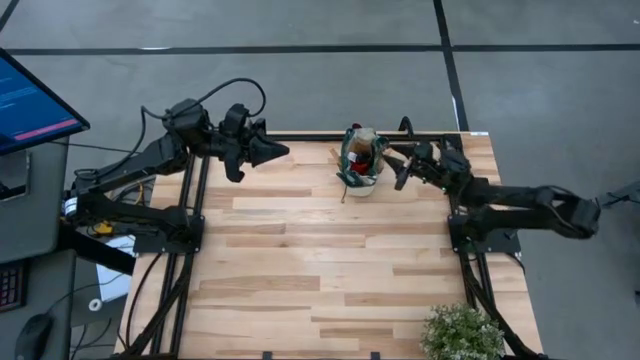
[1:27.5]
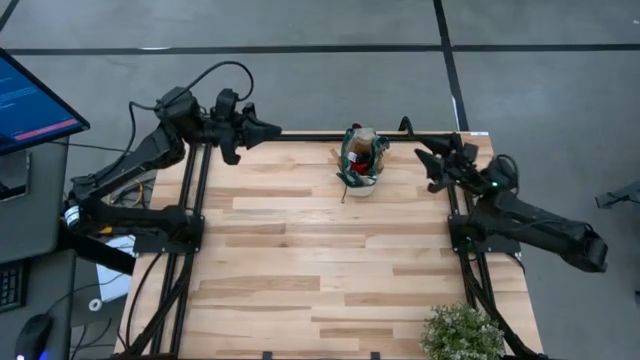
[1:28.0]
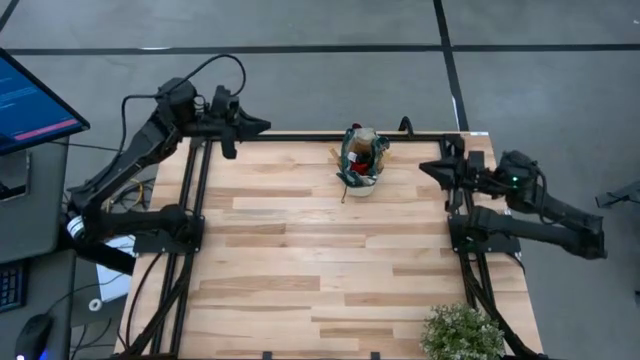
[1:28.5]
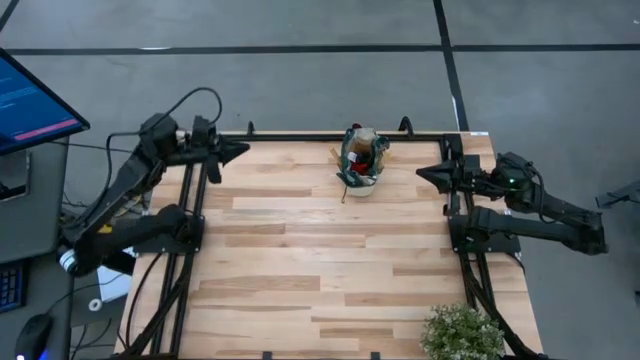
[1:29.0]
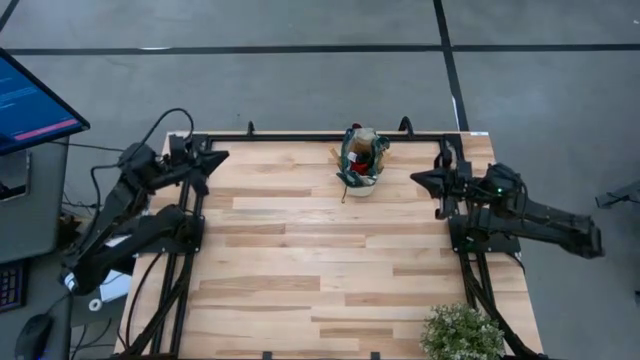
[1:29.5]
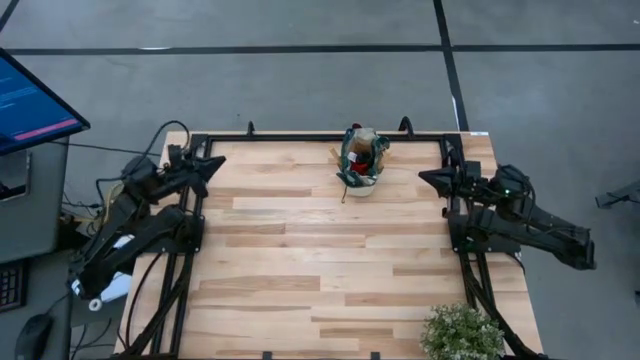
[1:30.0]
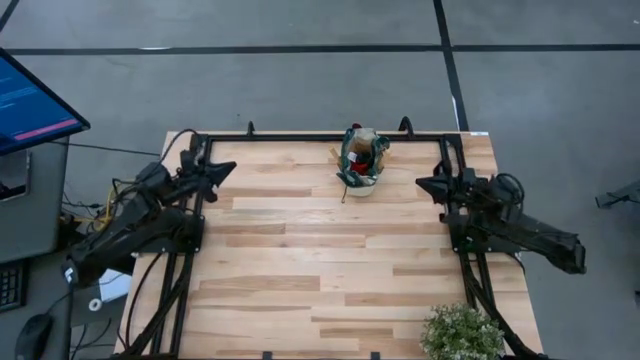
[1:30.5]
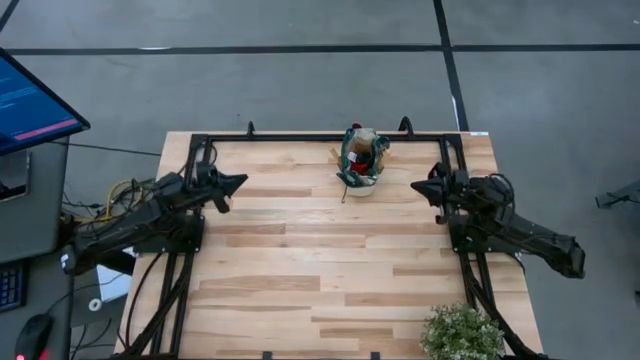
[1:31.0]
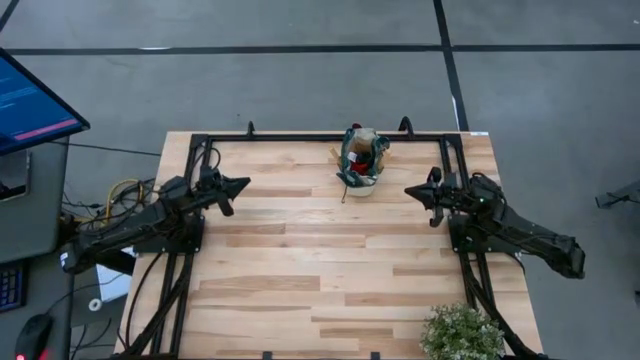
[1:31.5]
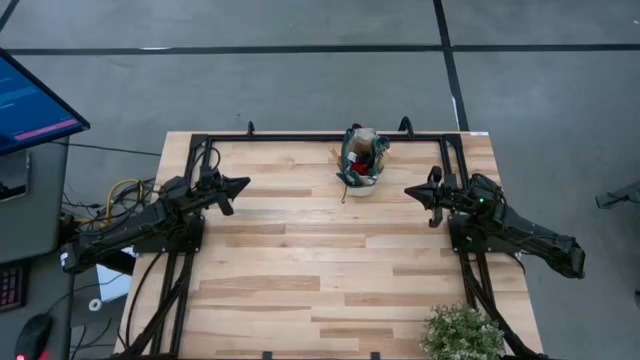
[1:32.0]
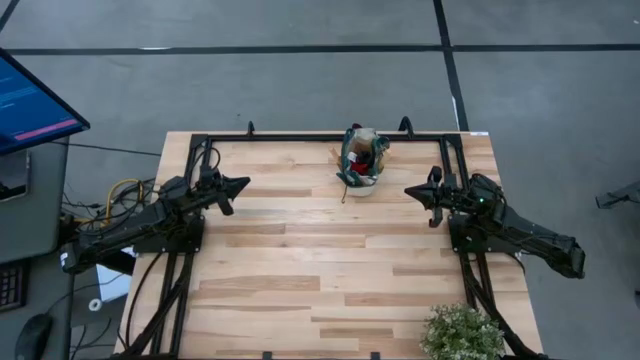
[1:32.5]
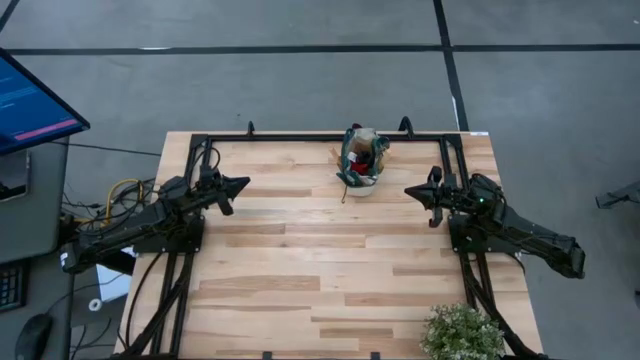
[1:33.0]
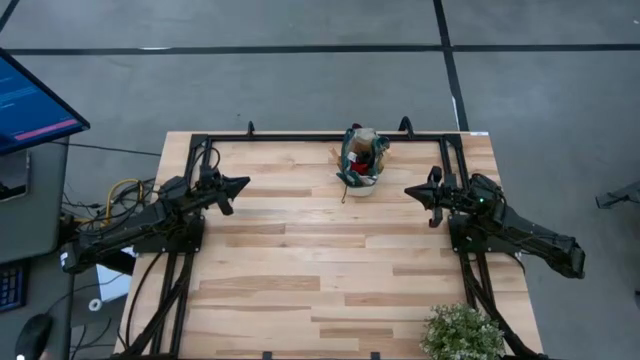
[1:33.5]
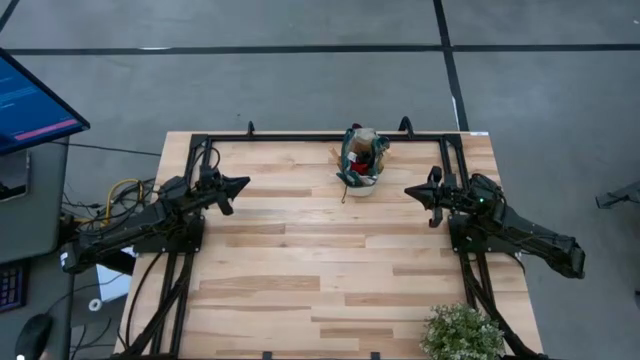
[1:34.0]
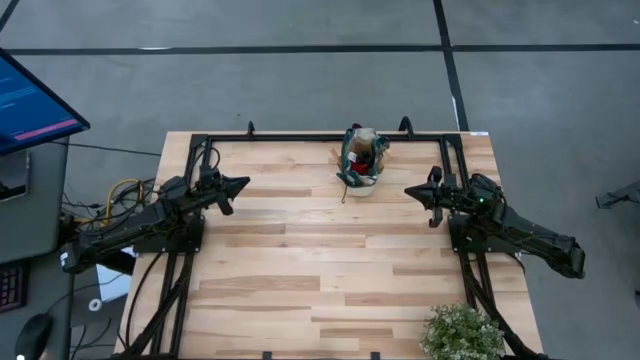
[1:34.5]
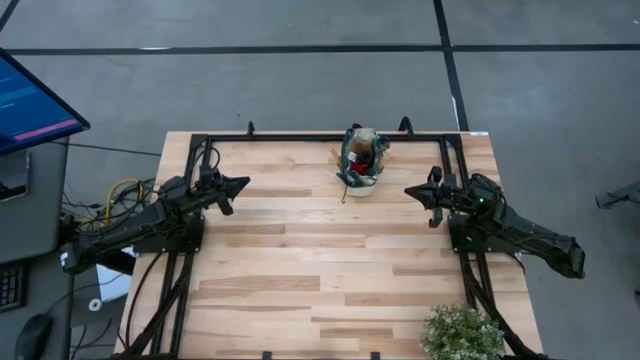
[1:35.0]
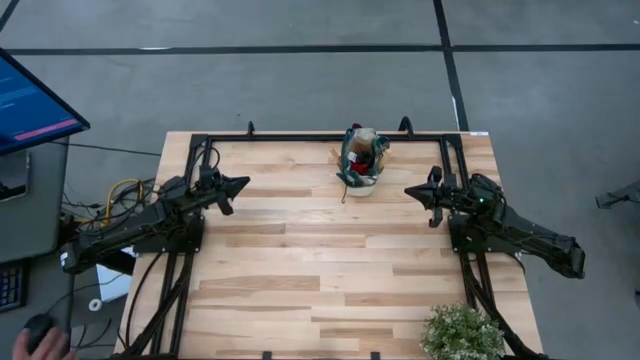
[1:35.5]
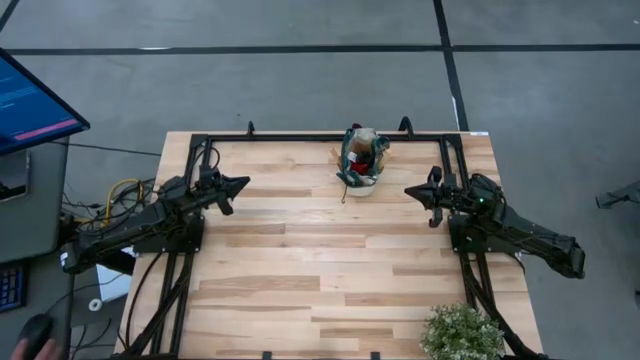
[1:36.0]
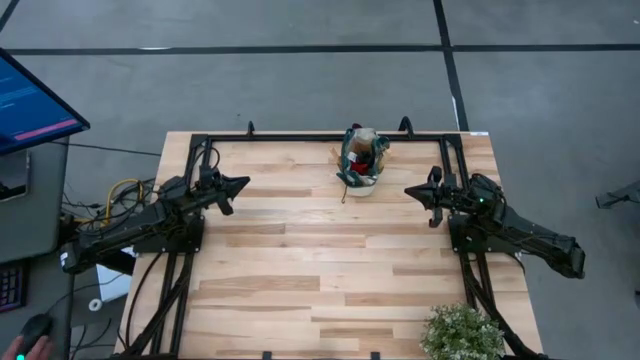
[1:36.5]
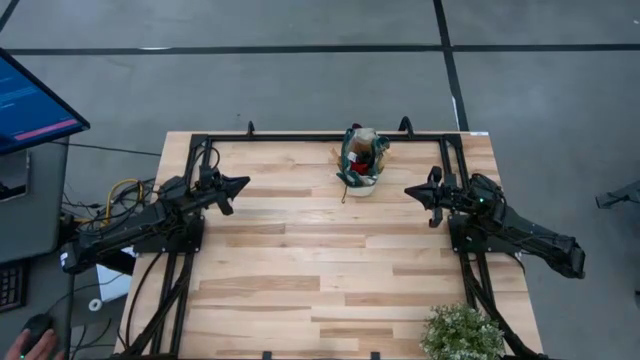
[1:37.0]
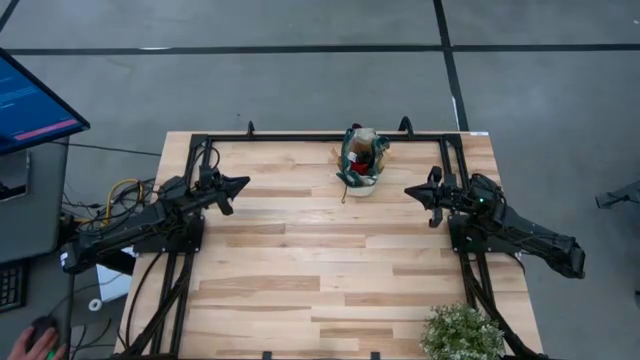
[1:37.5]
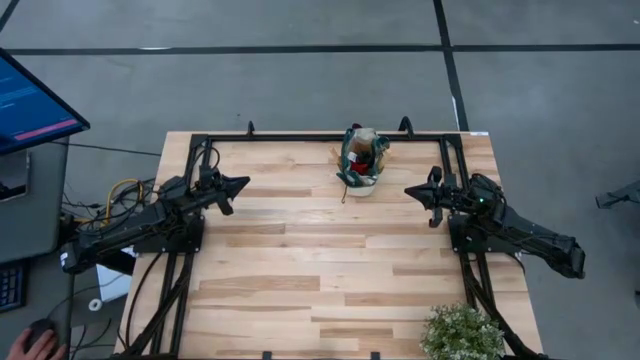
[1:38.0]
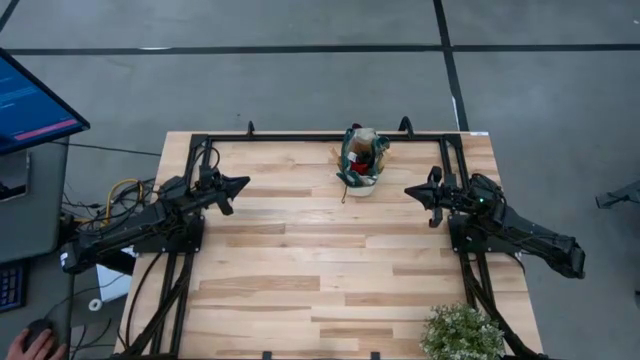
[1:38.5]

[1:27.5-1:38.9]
Task: Pick & Place Garden tools in Gardening bag
Return to Home Position

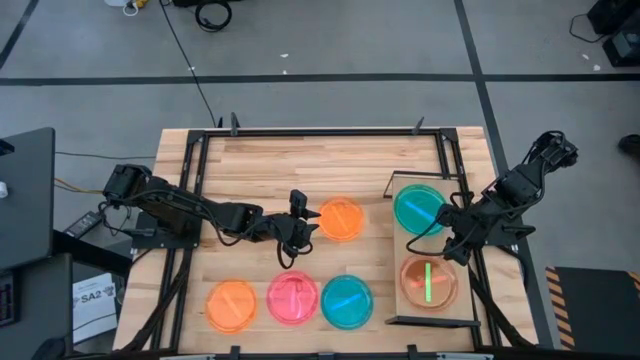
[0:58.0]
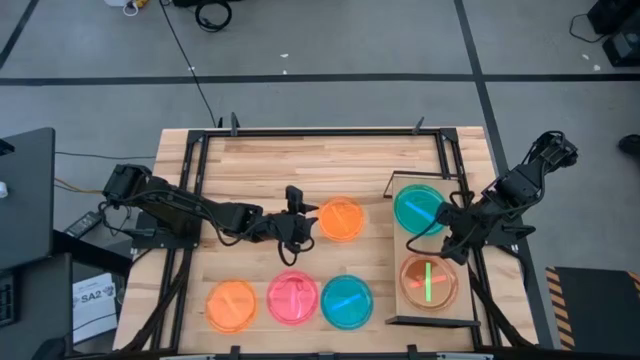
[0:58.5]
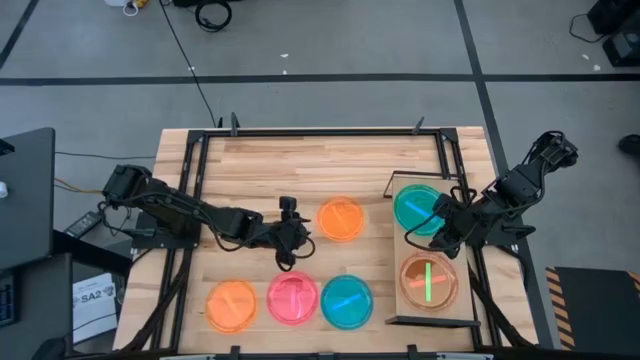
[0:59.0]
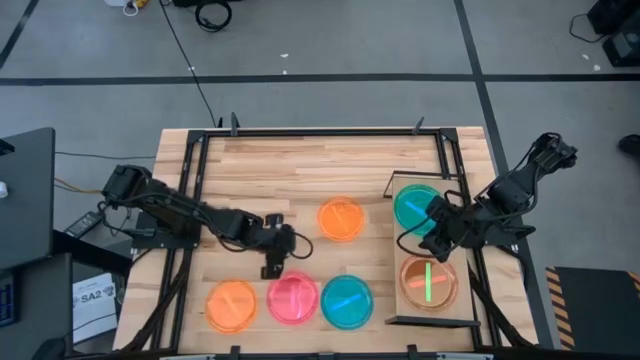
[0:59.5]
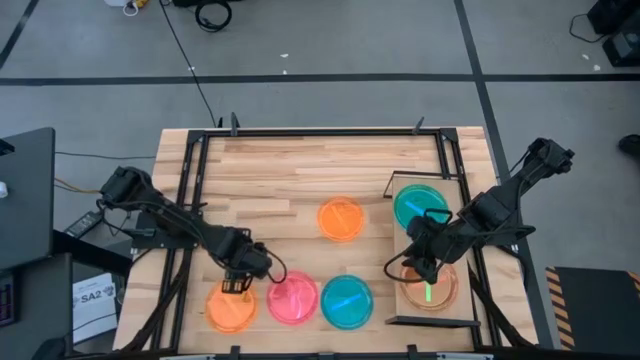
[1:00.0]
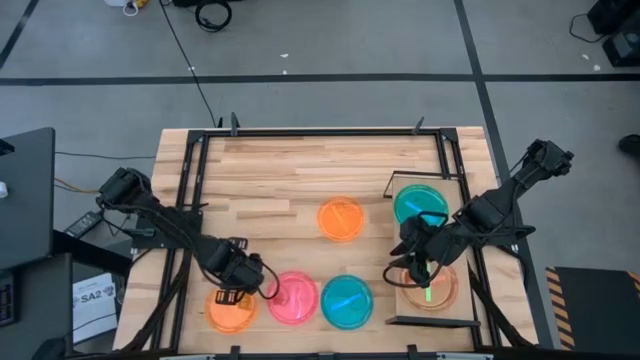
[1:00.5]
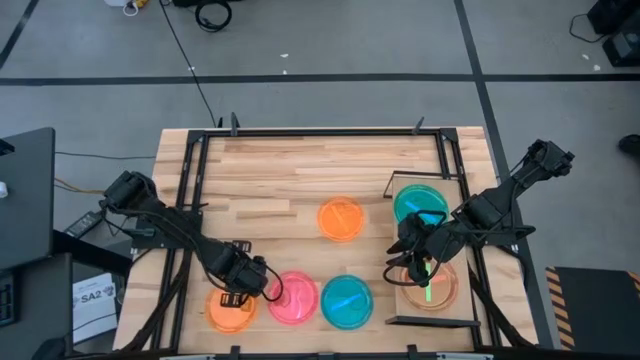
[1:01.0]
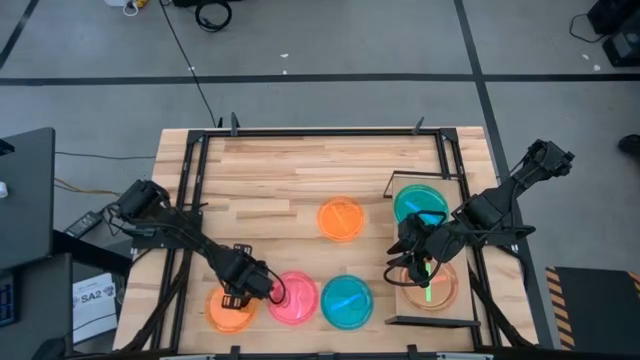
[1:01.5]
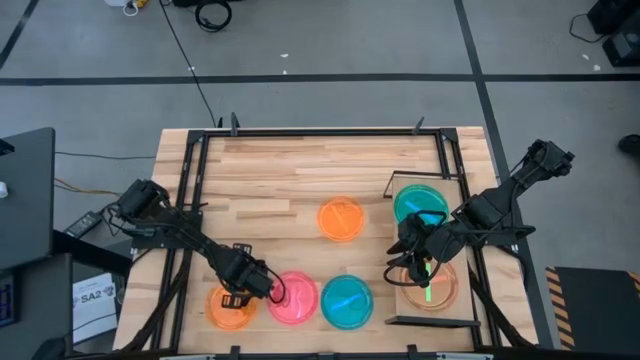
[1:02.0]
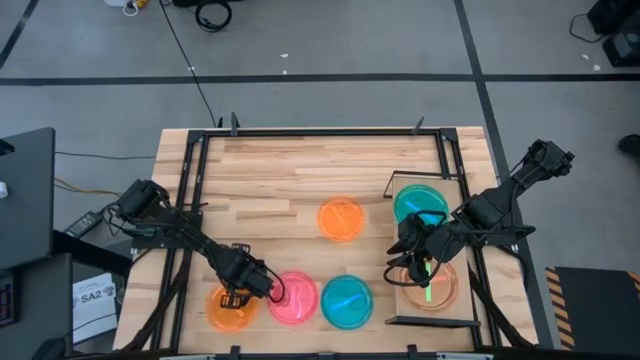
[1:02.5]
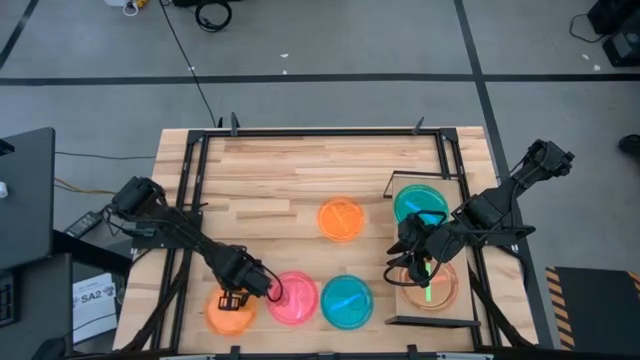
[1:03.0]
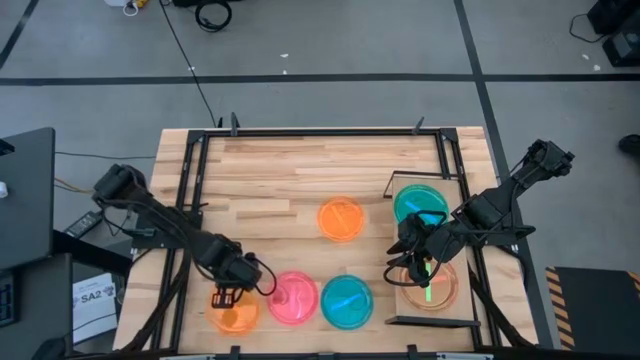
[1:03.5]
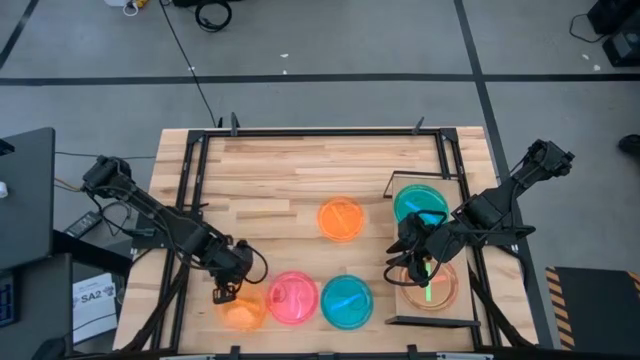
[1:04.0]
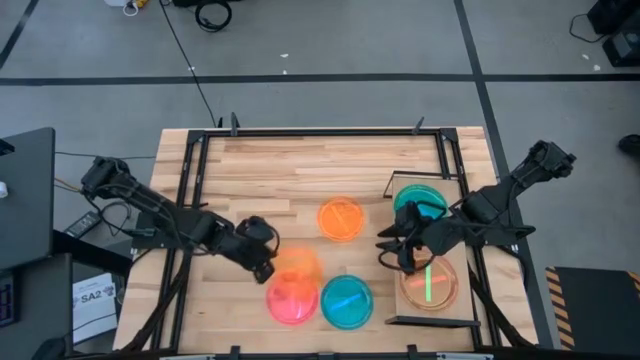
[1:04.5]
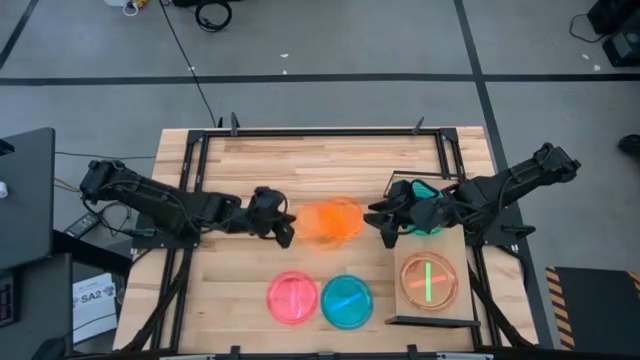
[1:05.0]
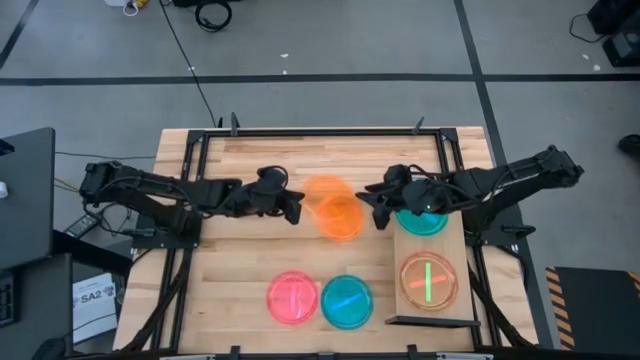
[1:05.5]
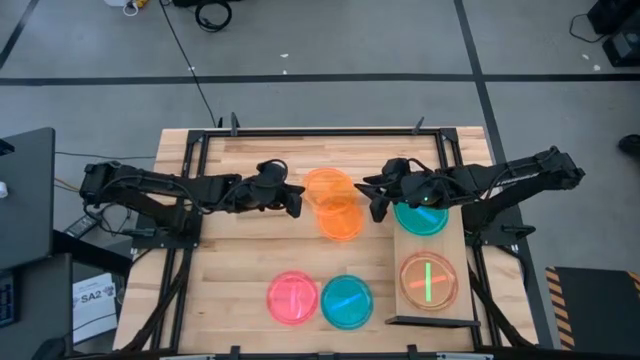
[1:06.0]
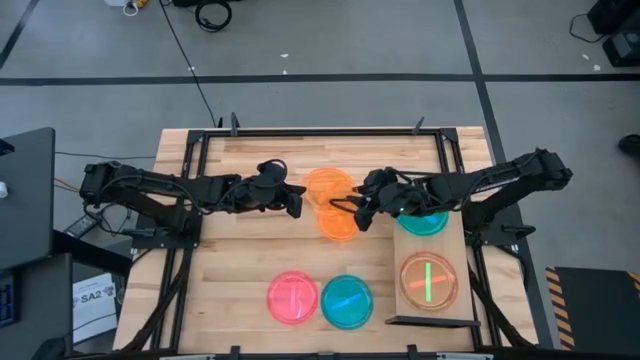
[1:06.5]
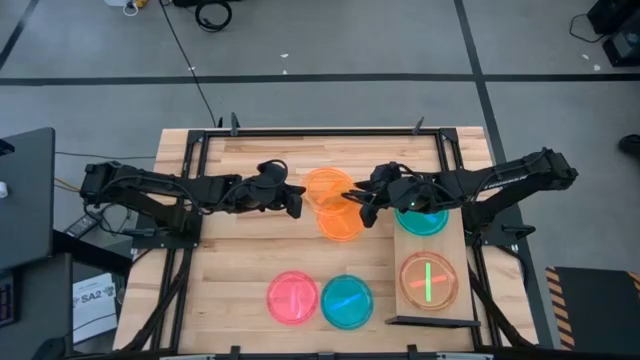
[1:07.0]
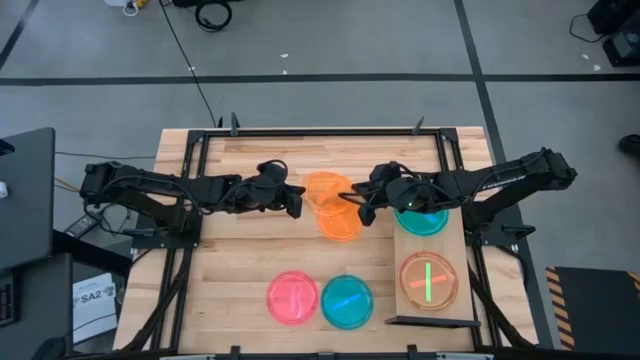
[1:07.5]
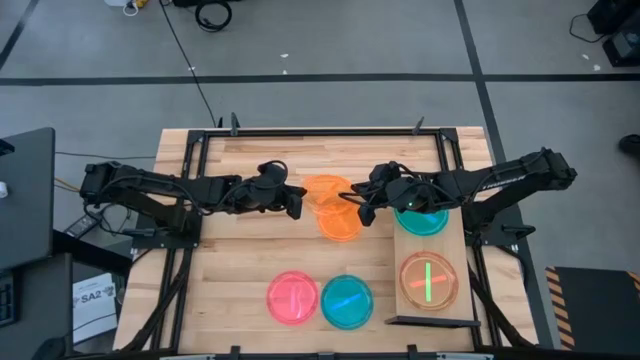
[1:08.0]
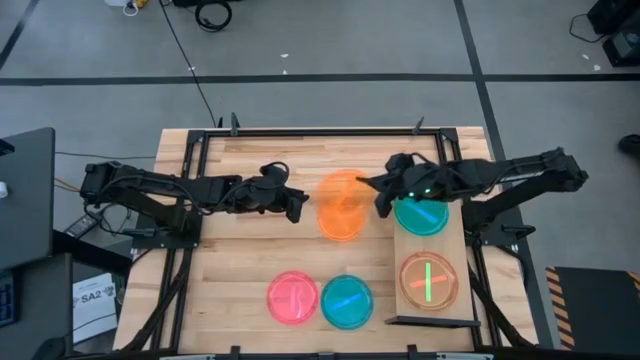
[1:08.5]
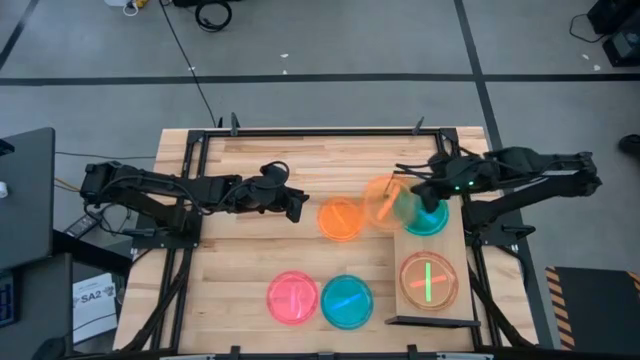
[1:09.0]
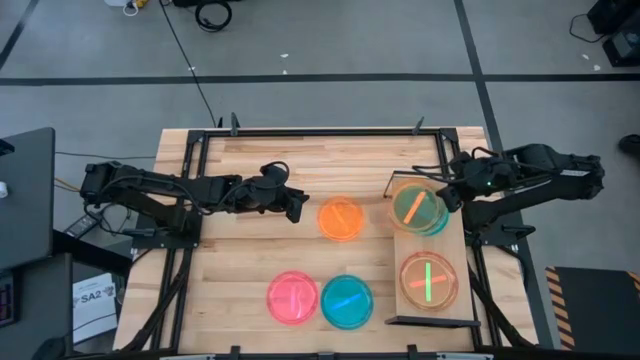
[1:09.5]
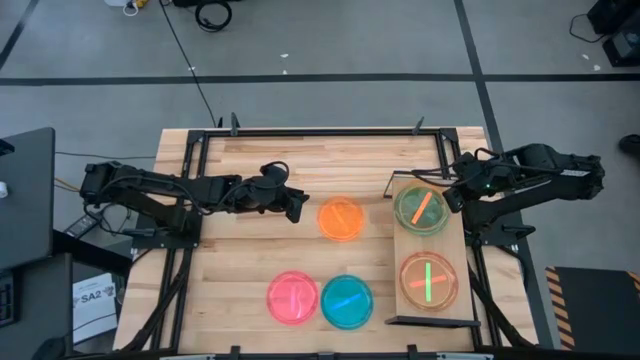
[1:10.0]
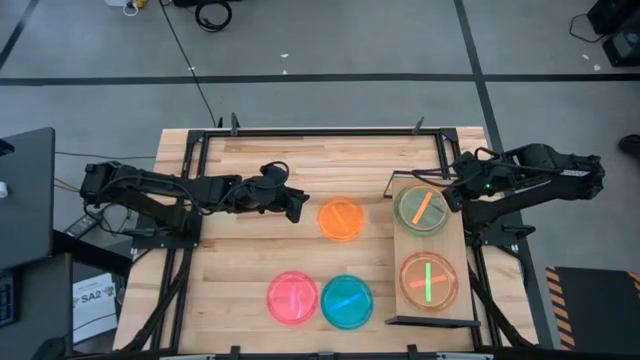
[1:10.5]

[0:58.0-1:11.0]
Task: Place and stack plates onto a shelf
Stack the bottom orange transparent plate on top of the blue transparent plate on the shelf
